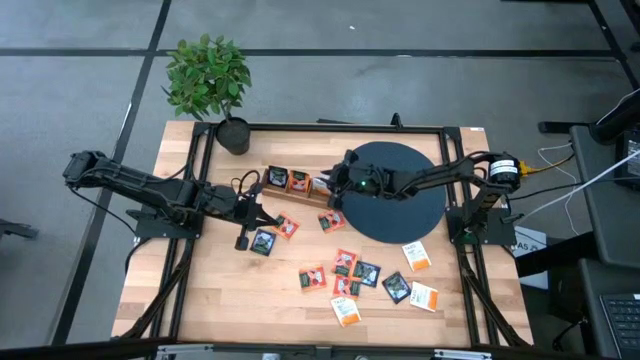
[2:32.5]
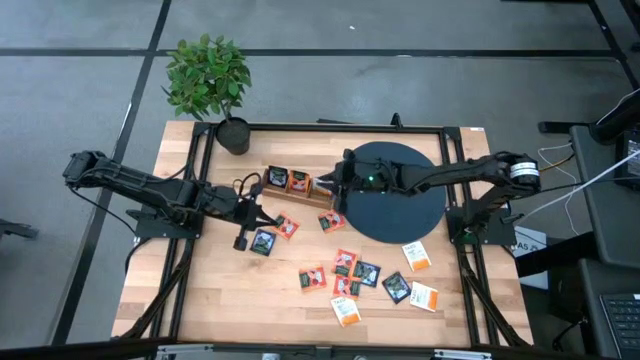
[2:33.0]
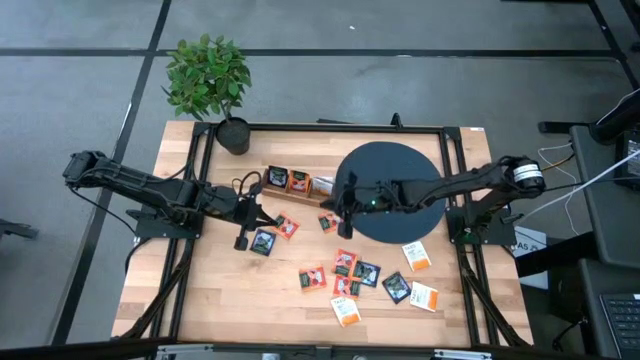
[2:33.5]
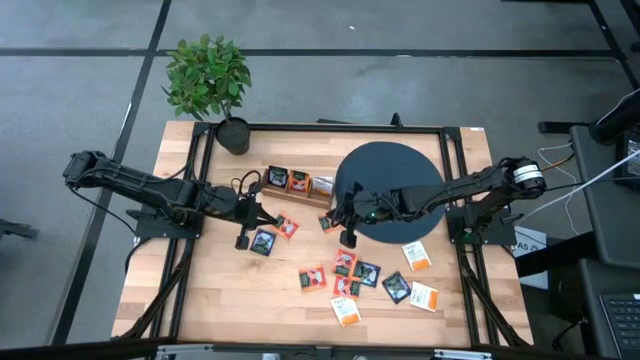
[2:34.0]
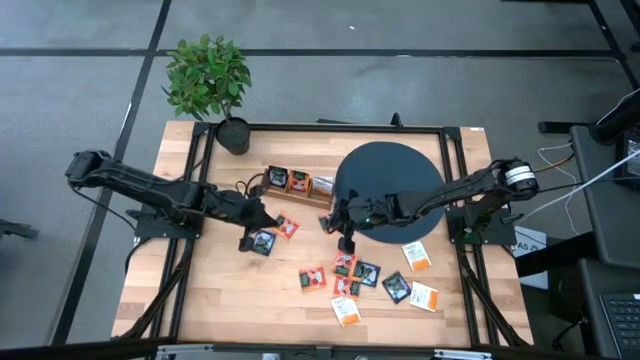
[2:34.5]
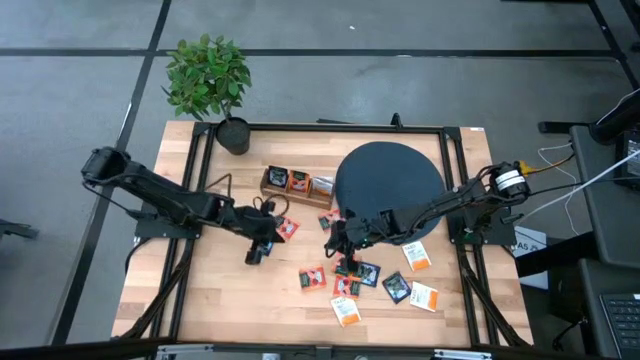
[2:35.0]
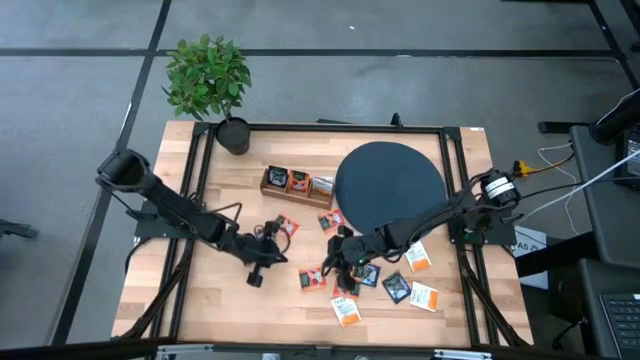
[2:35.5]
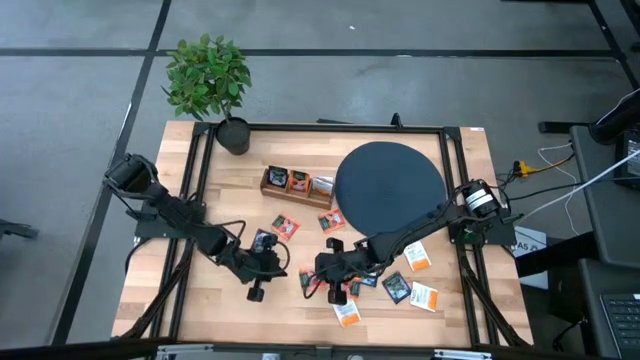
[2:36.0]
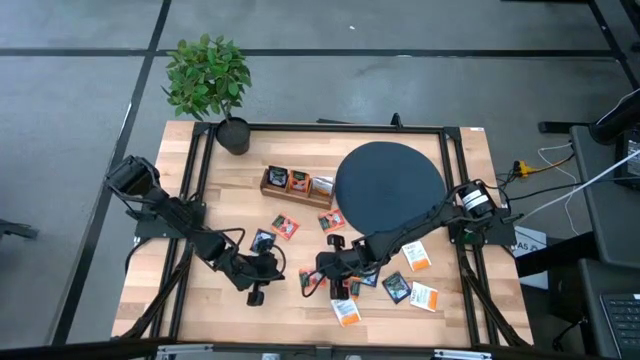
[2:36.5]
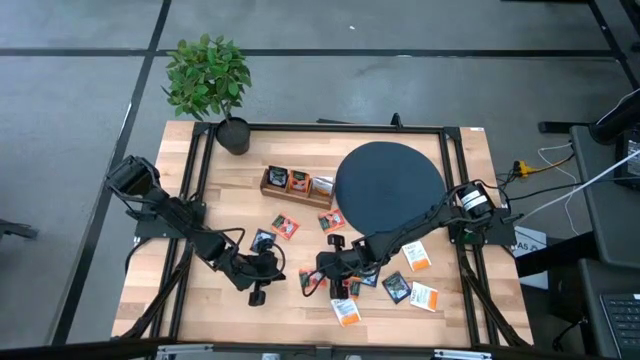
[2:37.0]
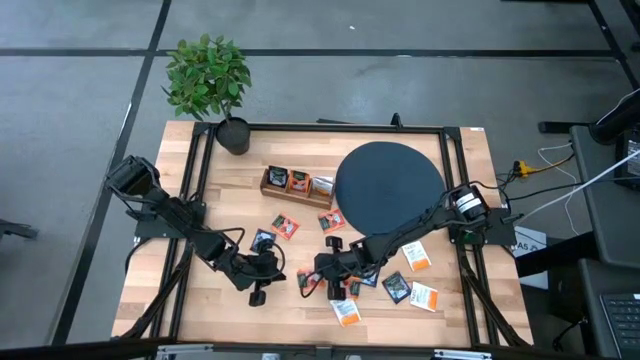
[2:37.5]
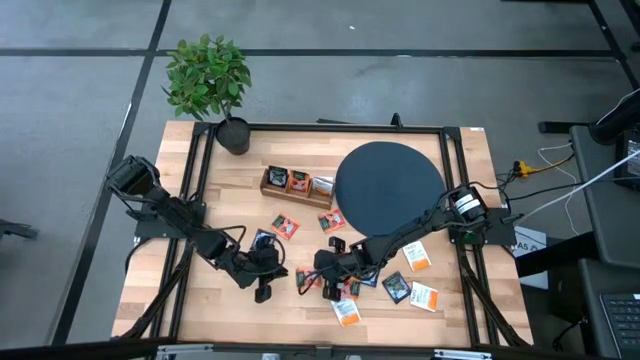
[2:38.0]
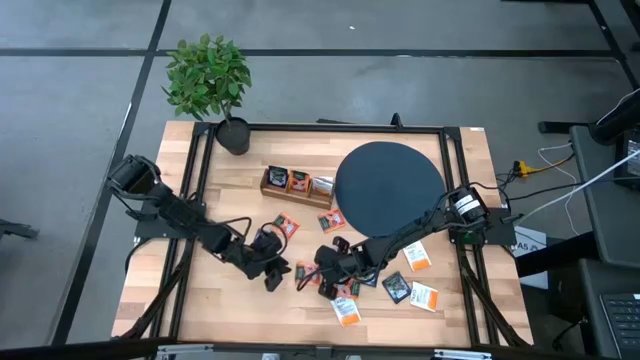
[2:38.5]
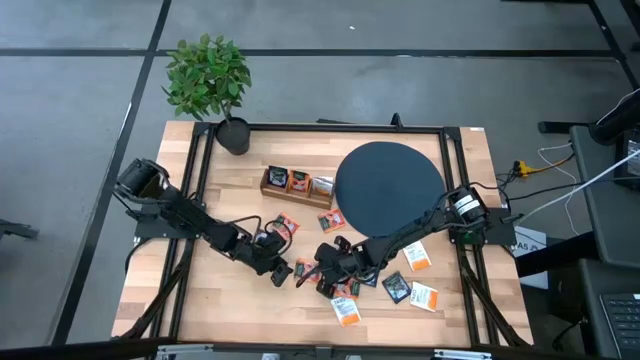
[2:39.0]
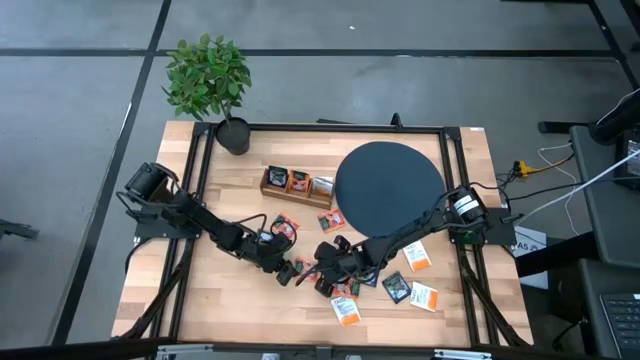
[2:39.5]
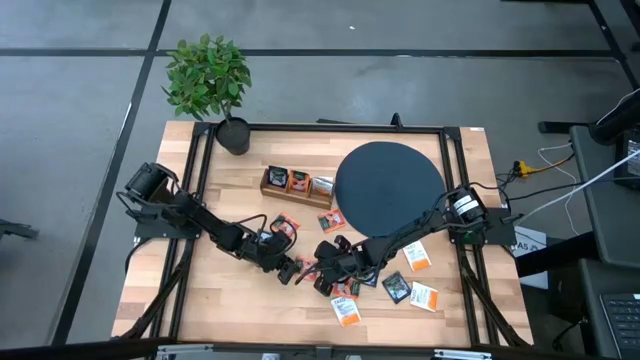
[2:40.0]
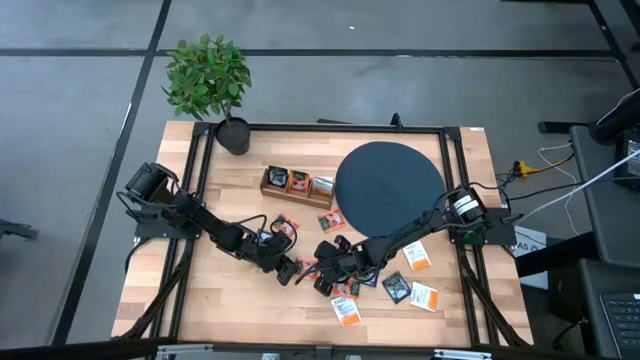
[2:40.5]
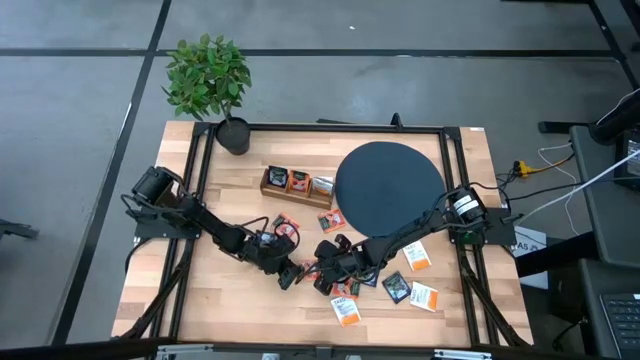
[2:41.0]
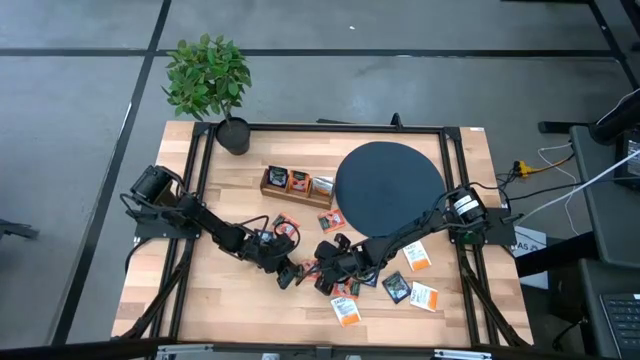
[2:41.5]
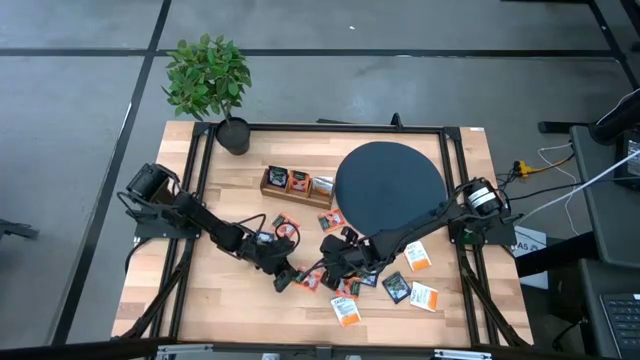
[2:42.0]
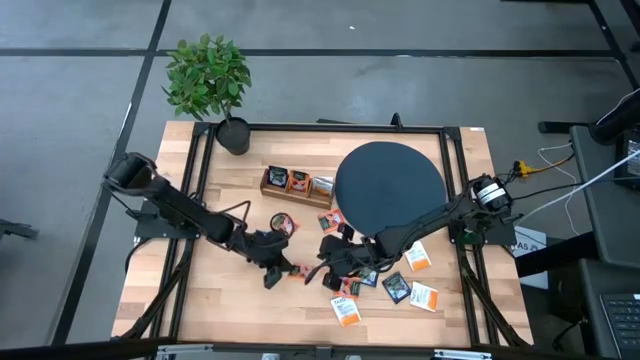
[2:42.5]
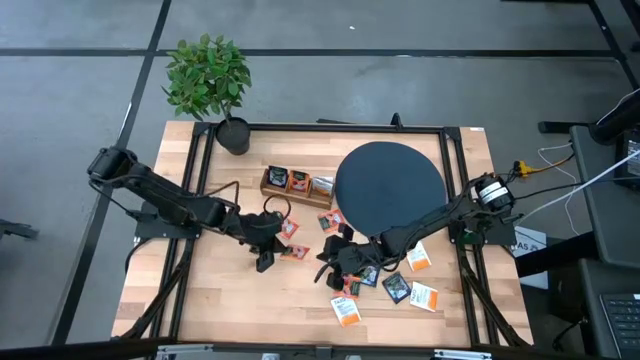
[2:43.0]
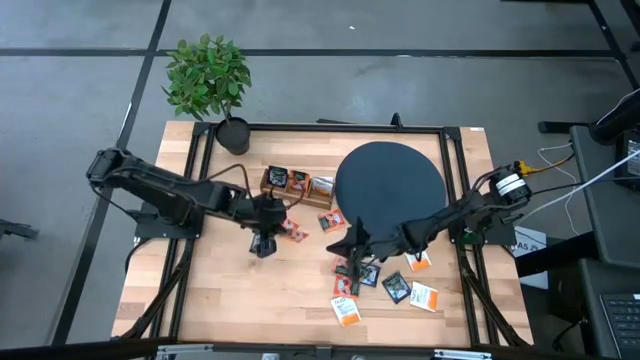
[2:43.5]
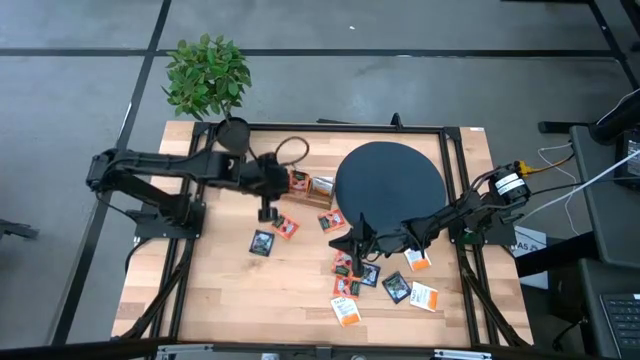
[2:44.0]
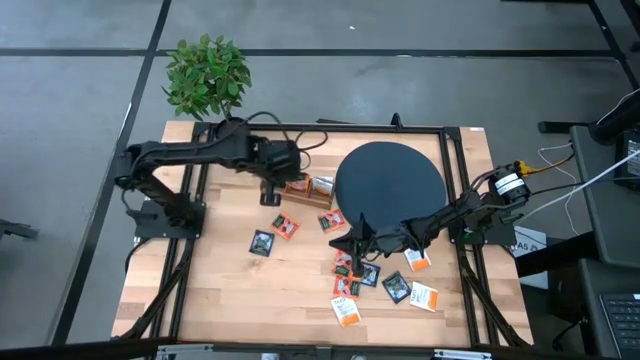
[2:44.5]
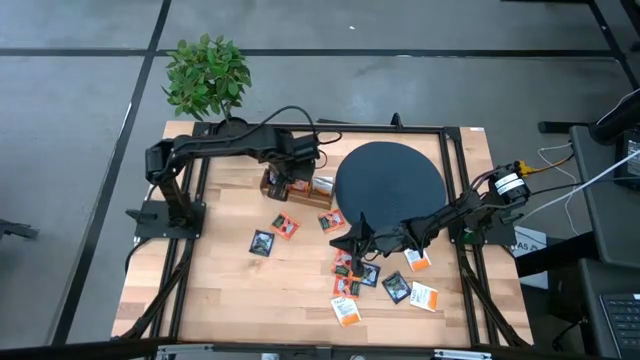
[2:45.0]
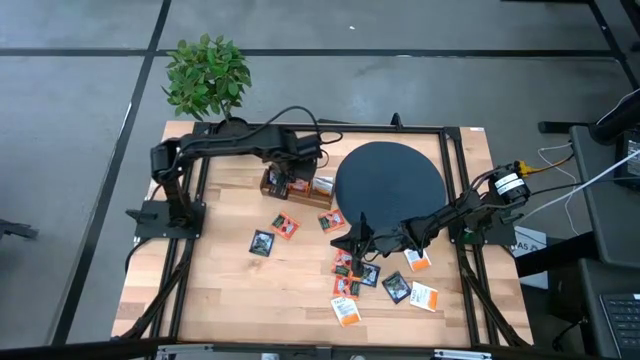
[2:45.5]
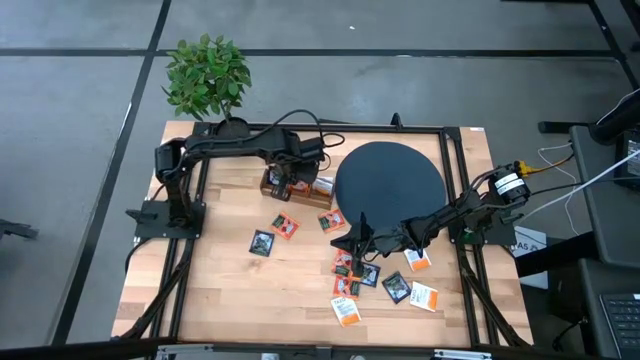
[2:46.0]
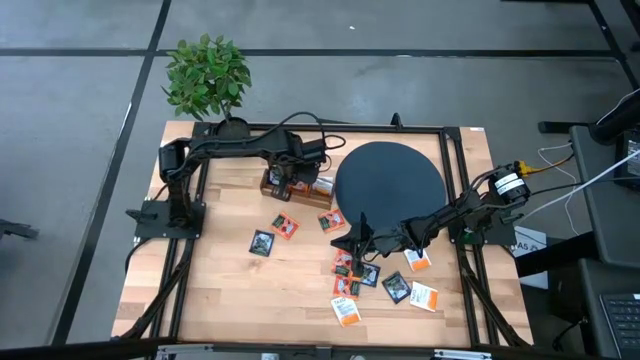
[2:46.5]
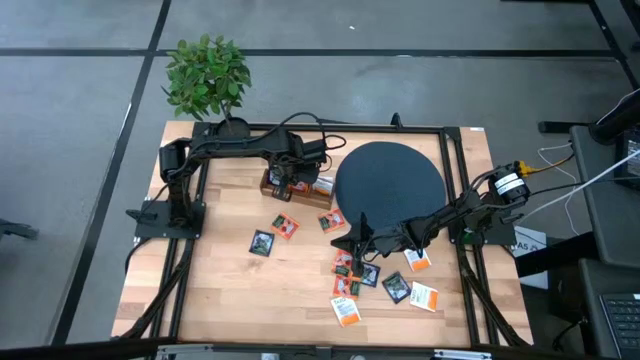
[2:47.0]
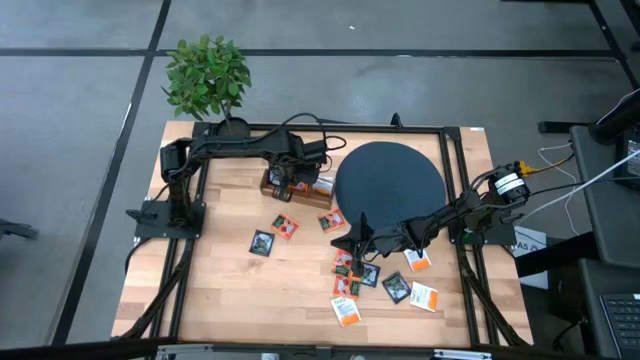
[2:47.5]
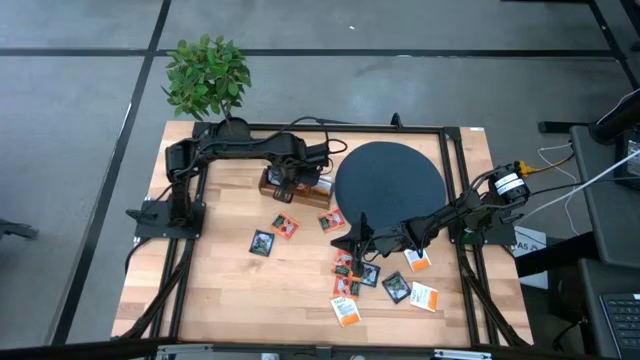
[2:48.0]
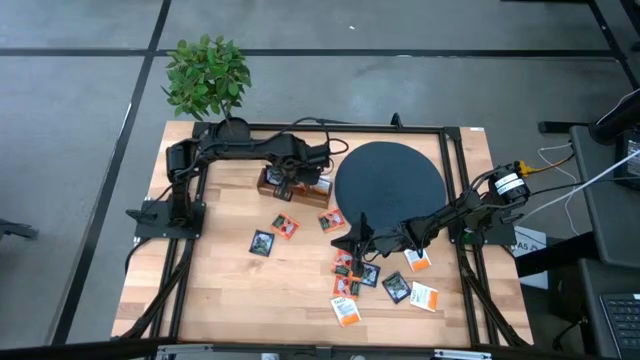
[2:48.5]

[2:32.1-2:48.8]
Task: Pick & Place Tea
Put the orange tea bag into the middle section of the wooden organizer

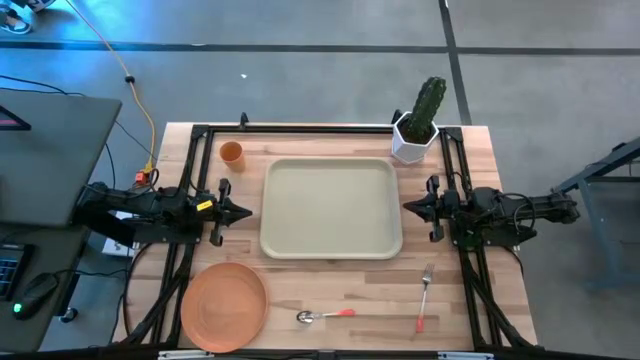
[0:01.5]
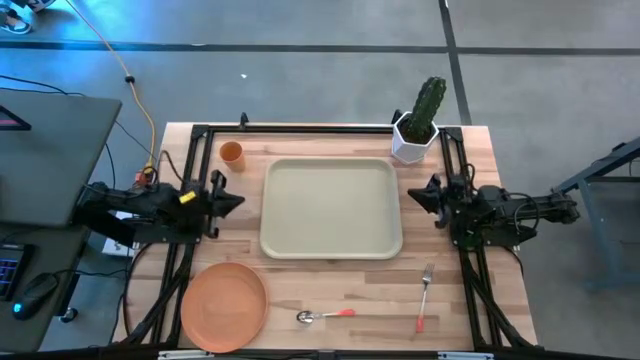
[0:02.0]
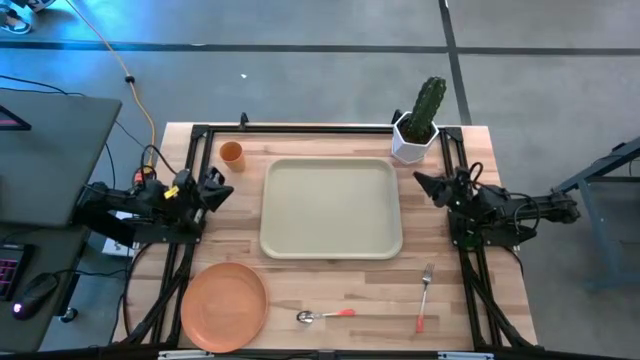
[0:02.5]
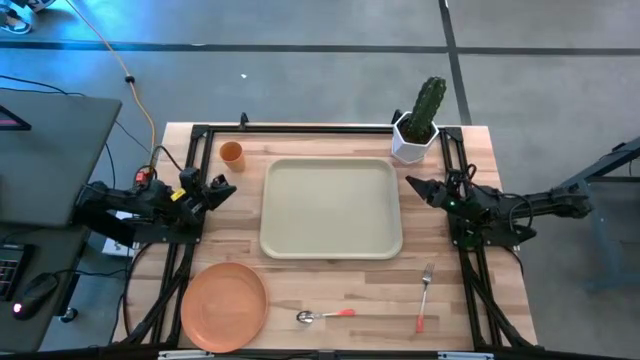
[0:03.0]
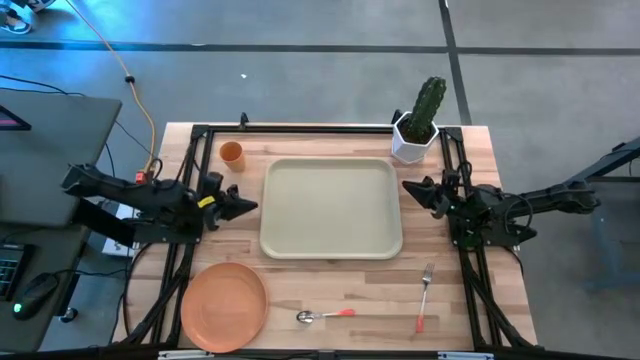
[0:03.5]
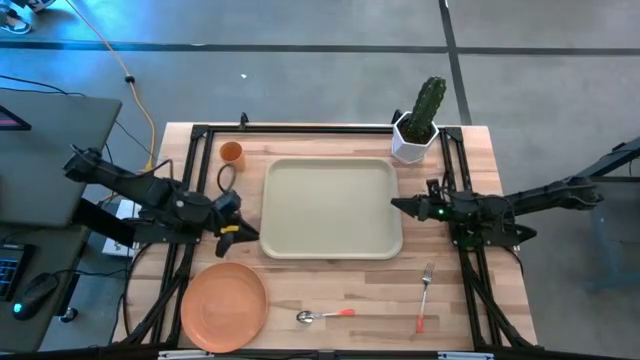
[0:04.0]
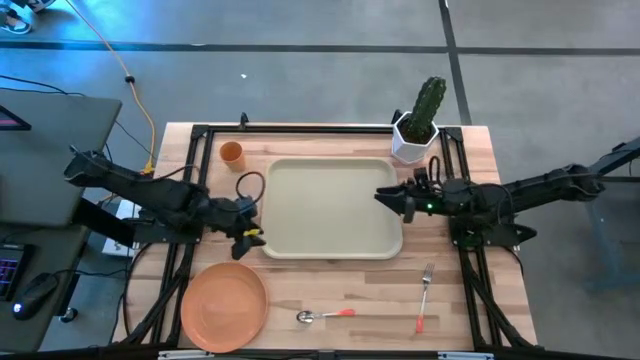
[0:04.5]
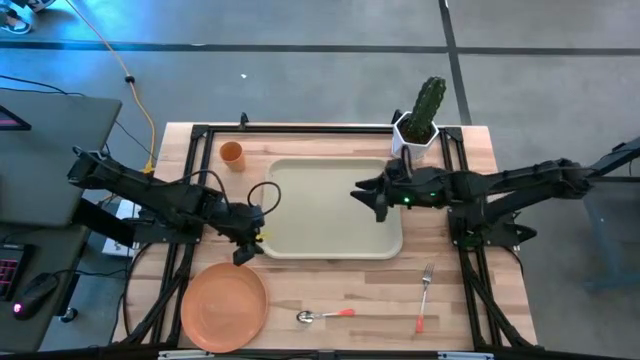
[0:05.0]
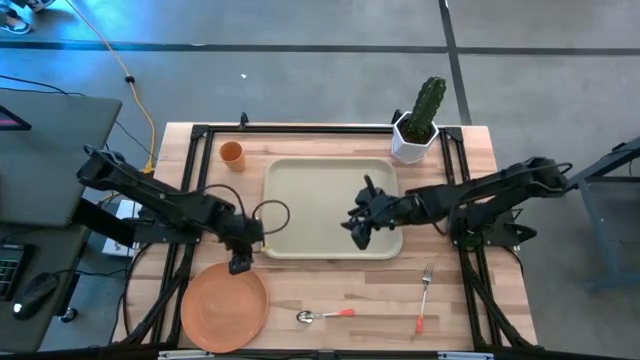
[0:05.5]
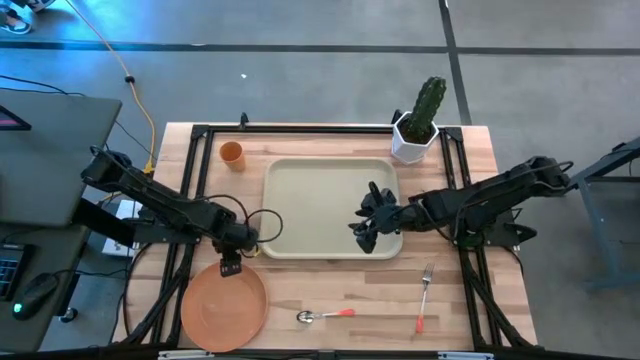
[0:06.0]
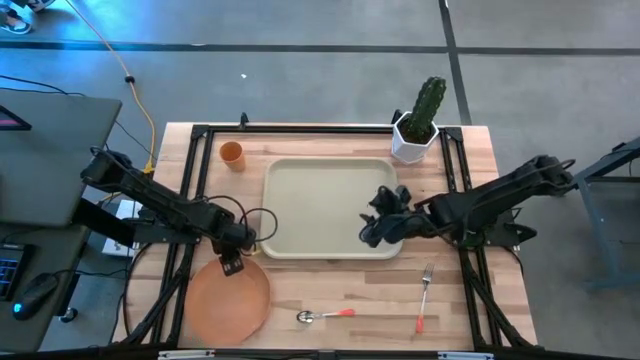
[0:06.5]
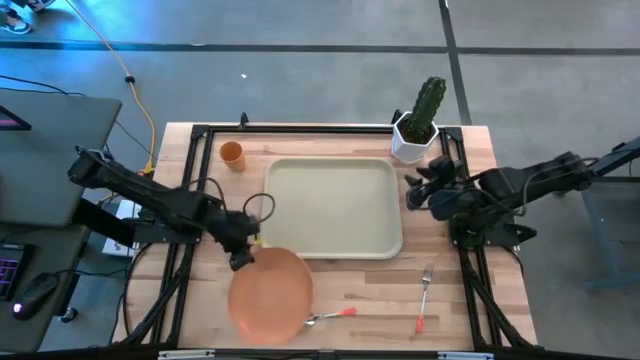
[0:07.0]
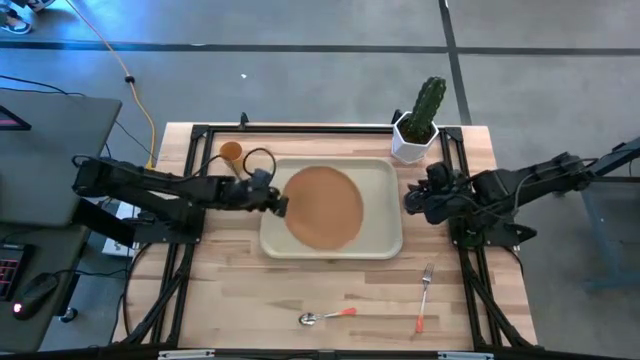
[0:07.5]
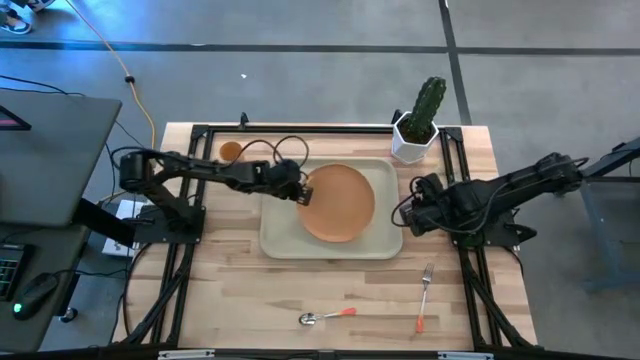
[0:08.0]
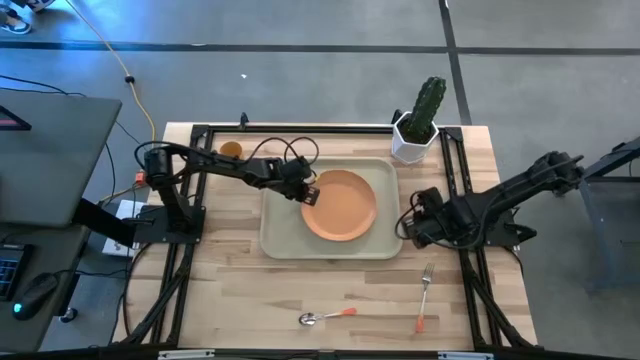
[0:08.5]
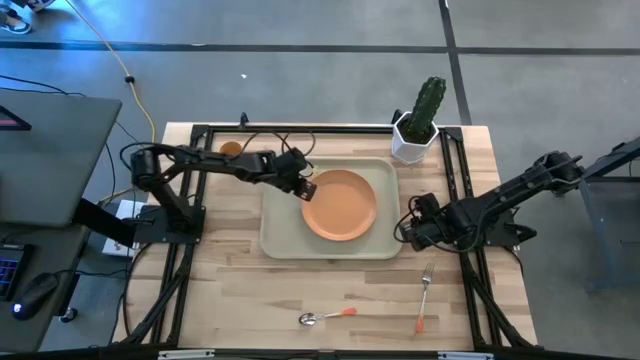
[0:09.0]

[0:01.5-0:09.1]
Task: Pick and place plate/cup/fork/spoon on tray
Put the orange plate to the center of the light brown tray
